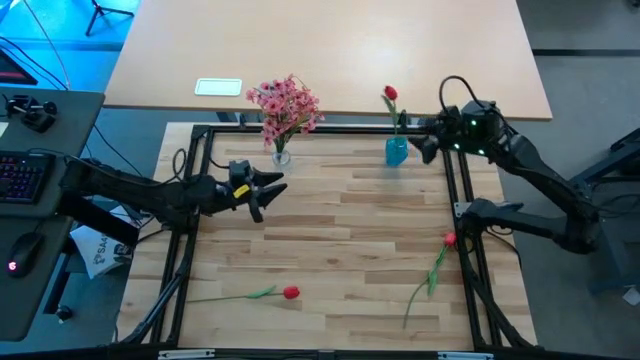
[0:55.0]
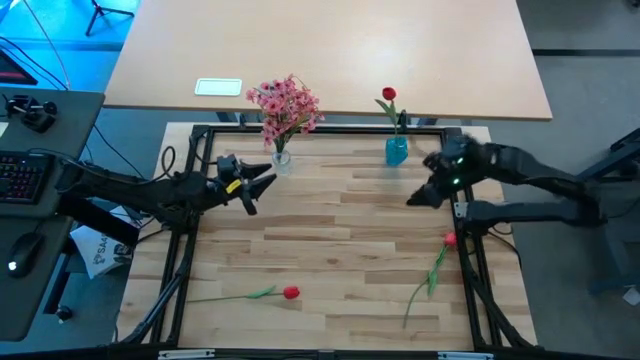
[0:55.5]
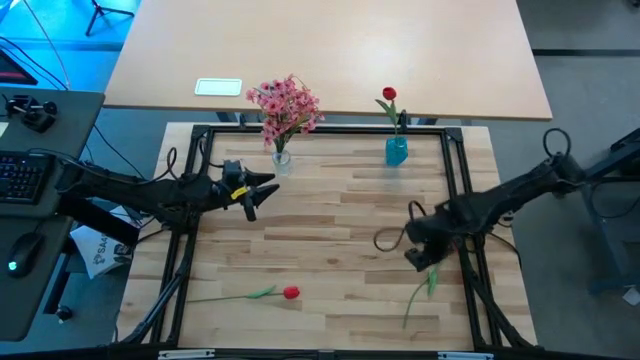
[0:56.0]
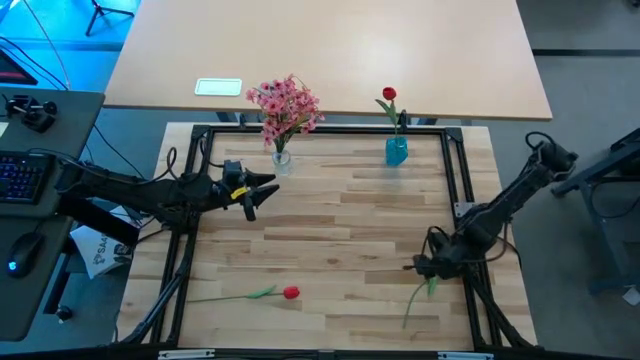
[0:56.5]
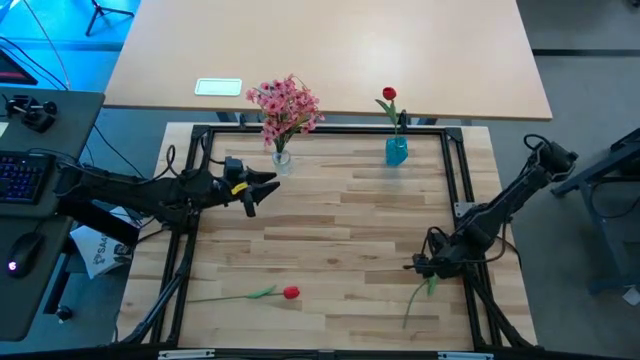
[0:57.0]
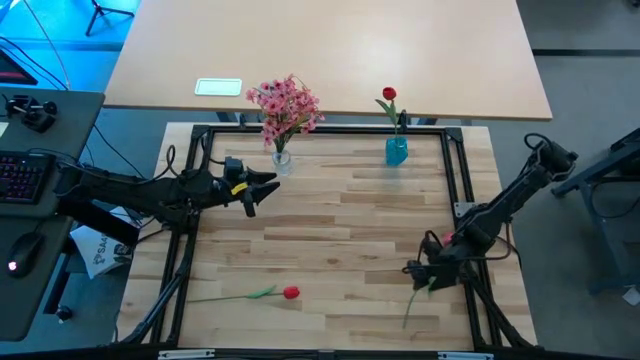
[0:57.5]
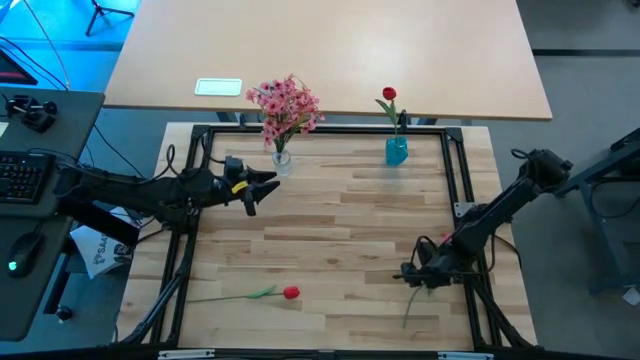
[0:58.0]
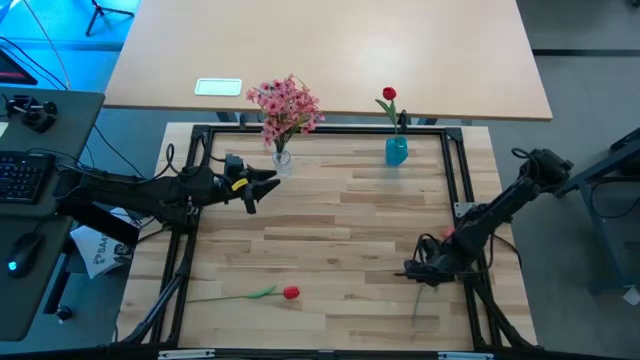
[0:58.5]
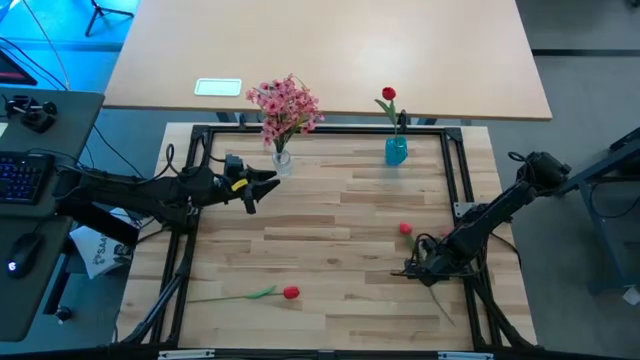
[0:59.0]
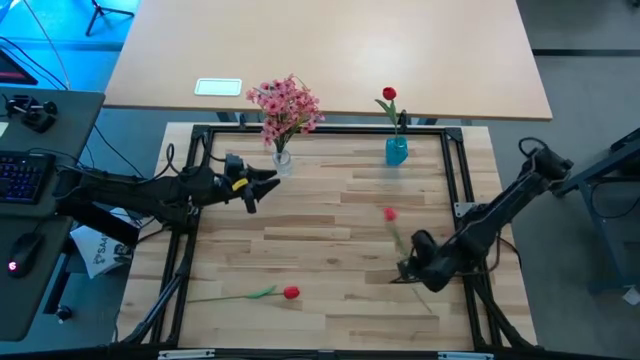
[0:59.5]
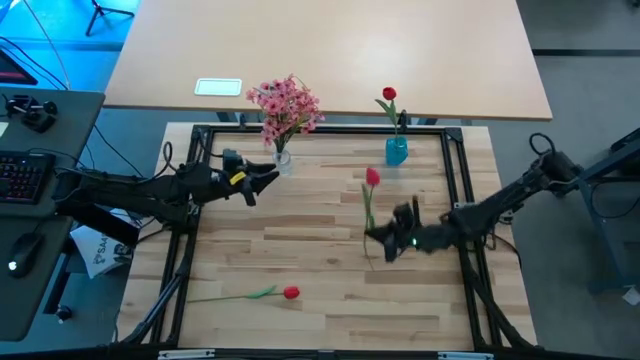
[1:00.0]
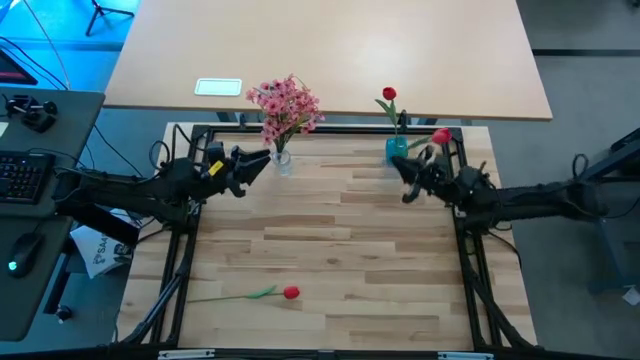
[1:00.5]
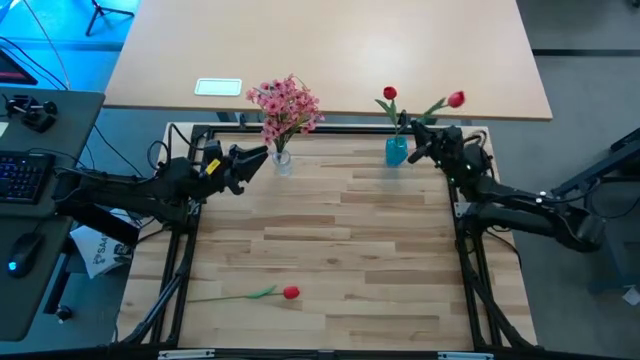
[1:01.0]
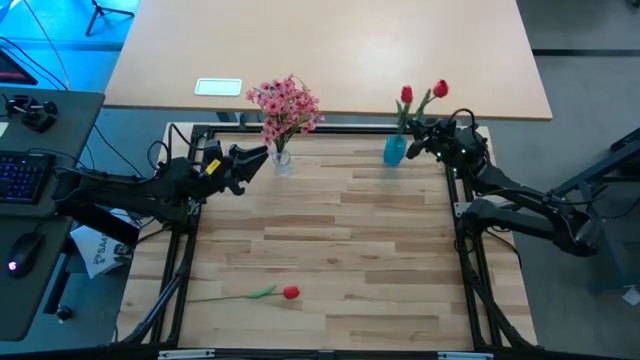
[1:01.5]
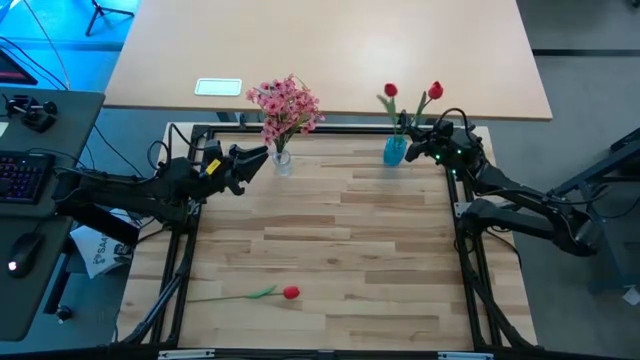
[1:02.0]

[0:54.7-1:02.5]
Task: Sort flowers into vase by color
Put the right red tulip into the blue vase

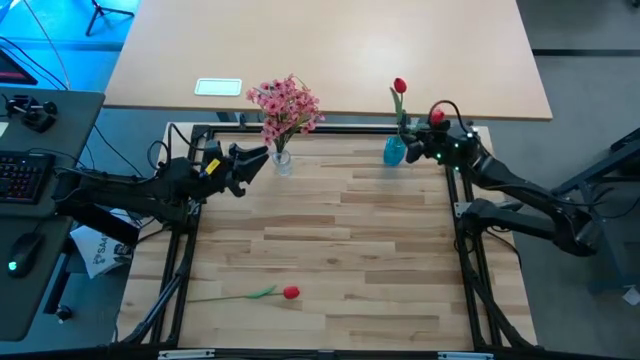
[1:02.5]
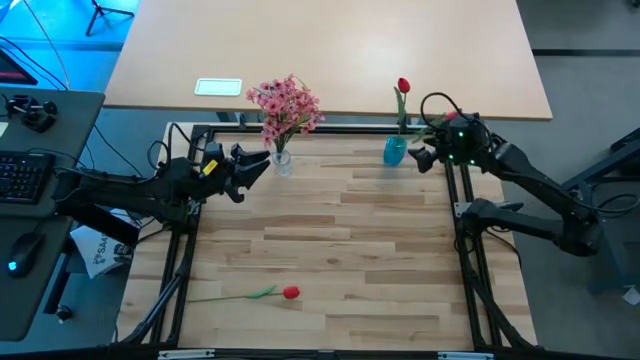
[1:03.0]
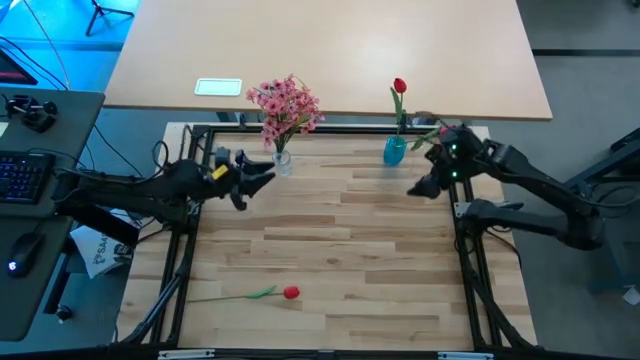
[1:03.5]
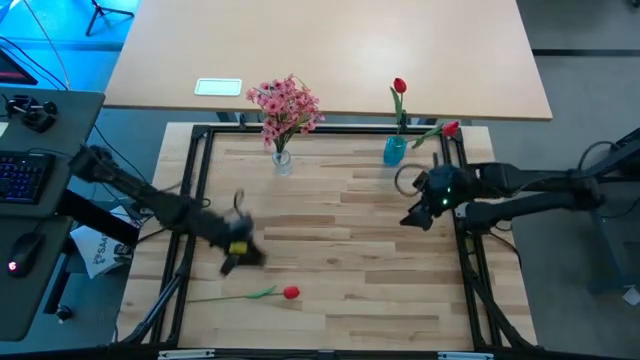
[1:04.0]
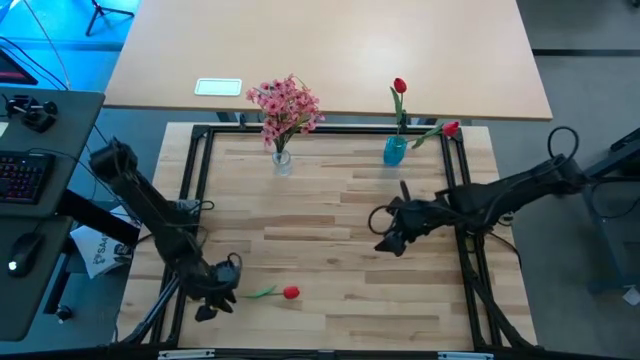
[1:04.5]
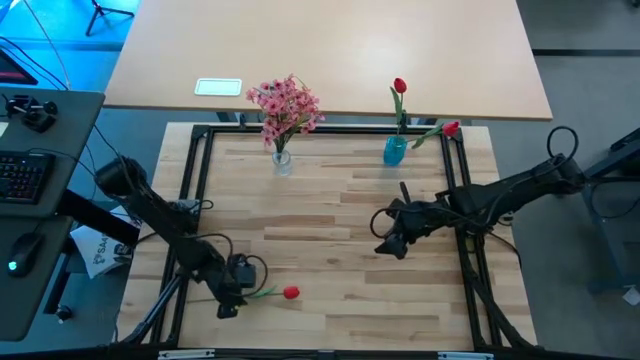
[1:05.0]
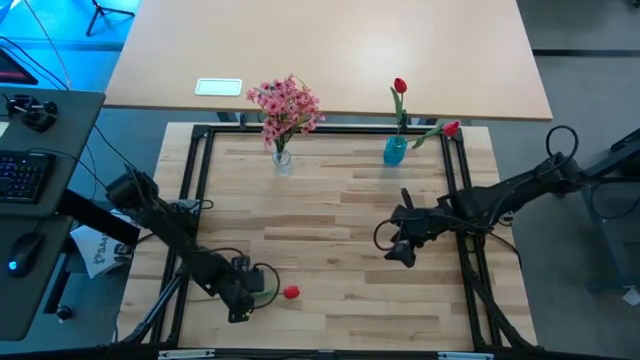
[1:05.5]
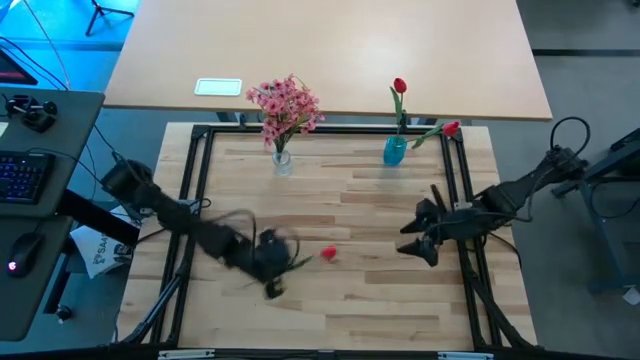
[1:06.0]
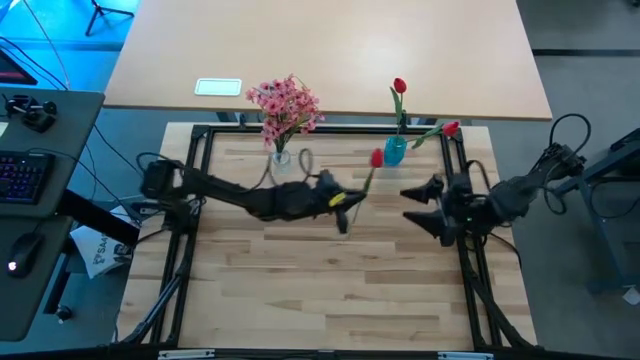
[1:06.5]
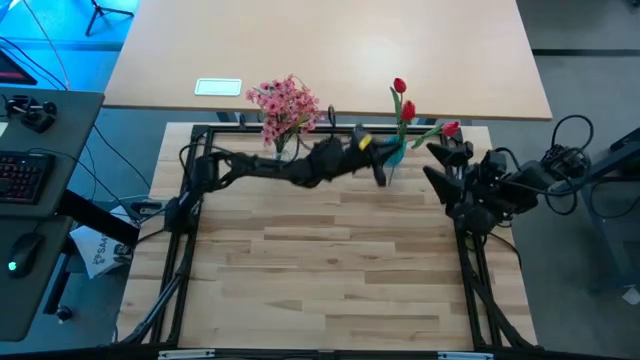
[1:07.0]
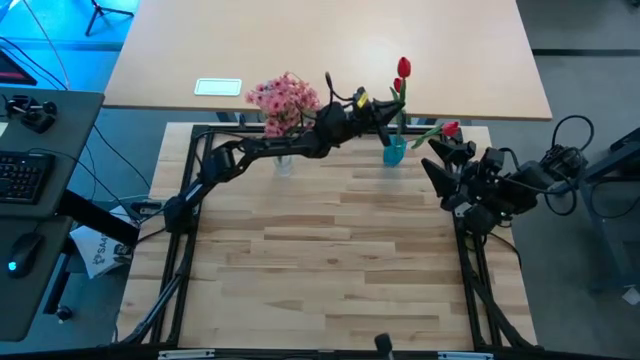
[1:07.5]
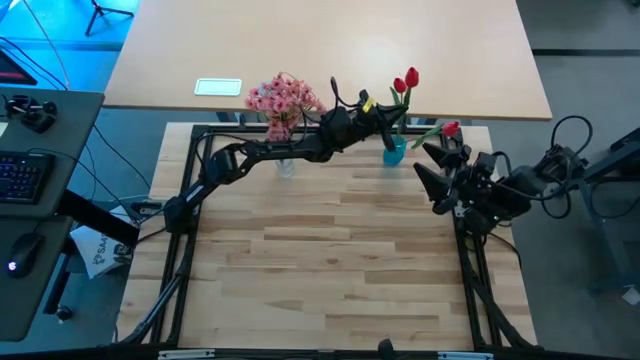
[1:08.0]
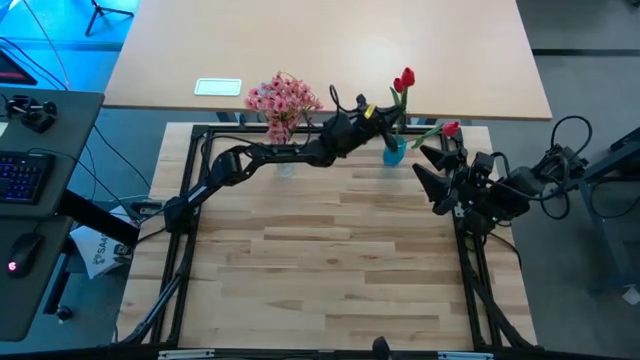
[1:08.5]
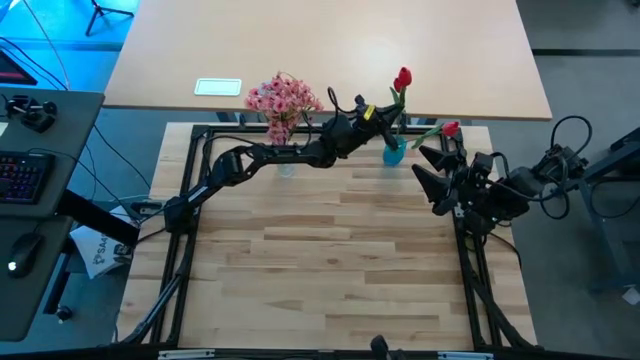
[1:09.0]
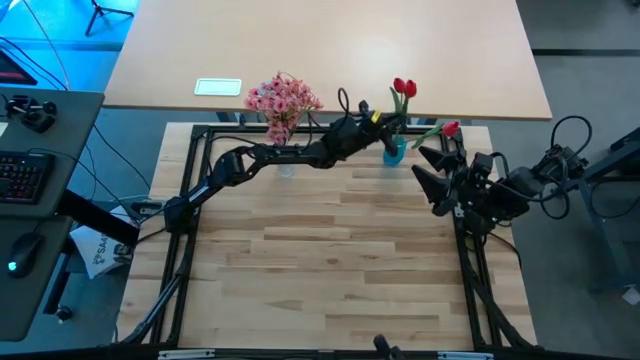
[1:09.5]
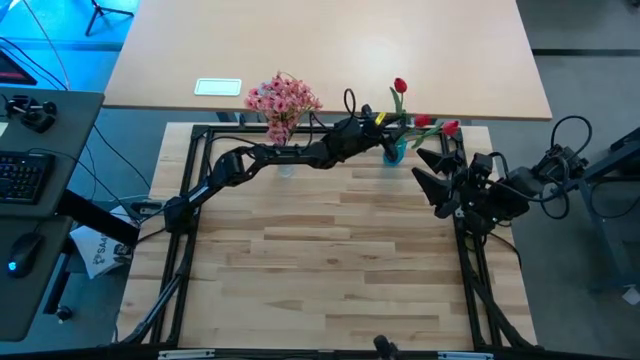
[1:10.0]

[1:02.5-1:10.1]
Put the red tulip into the blue vase

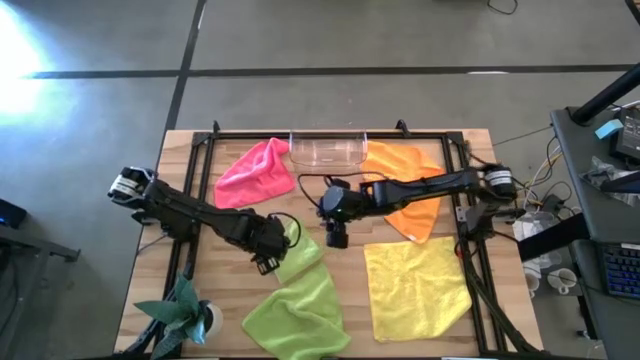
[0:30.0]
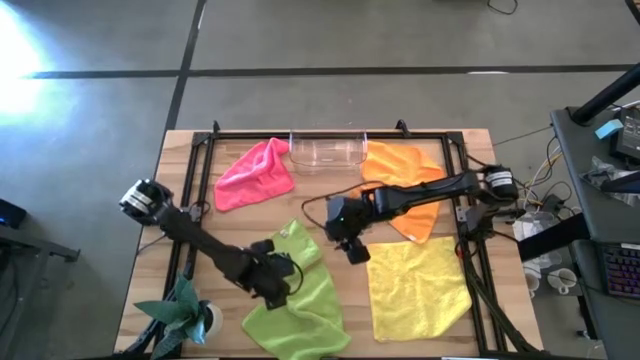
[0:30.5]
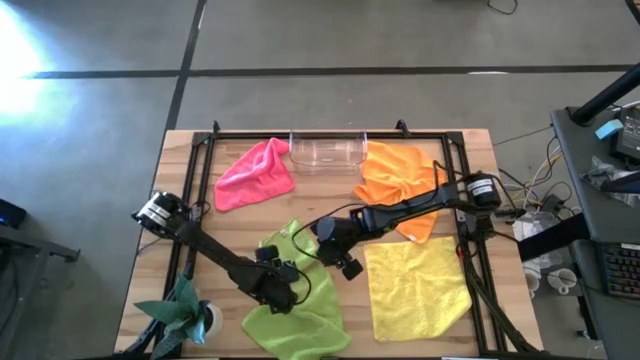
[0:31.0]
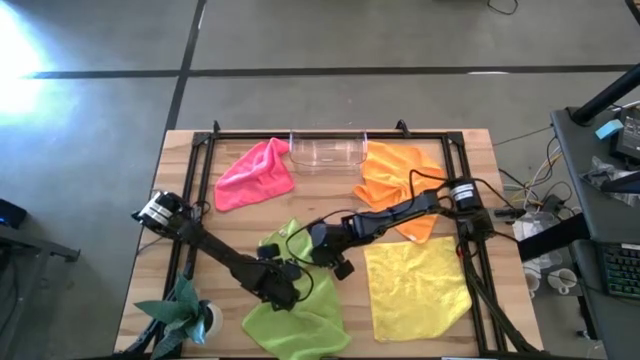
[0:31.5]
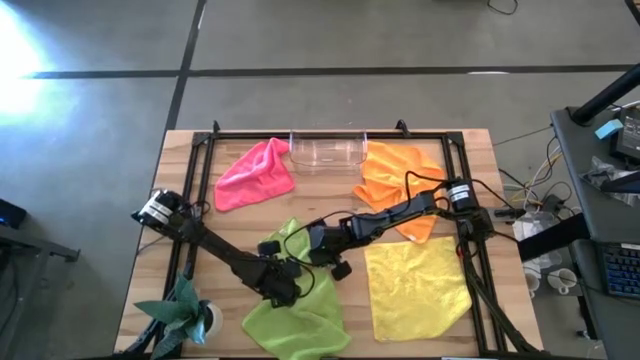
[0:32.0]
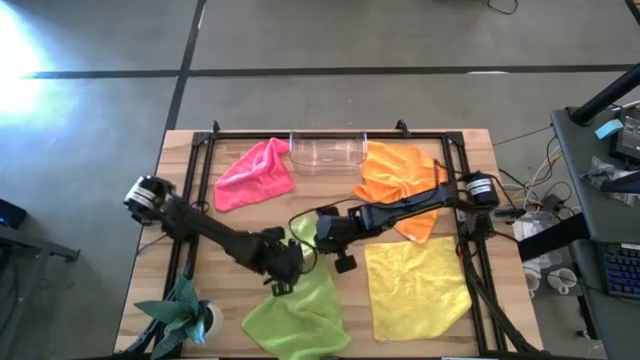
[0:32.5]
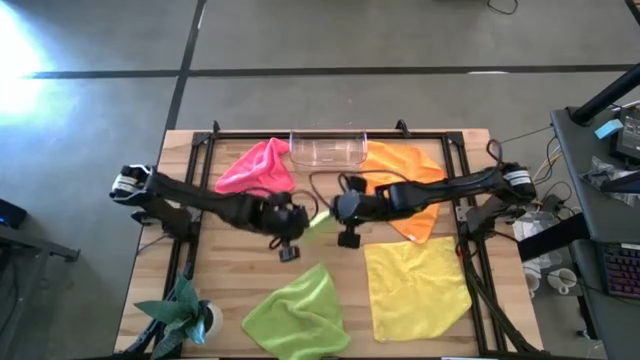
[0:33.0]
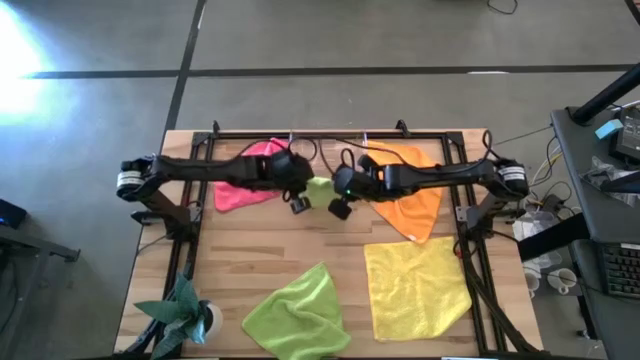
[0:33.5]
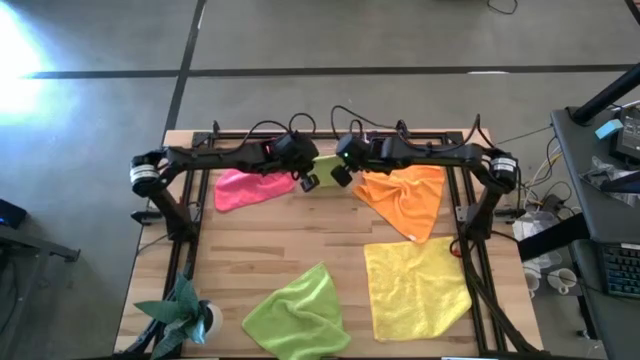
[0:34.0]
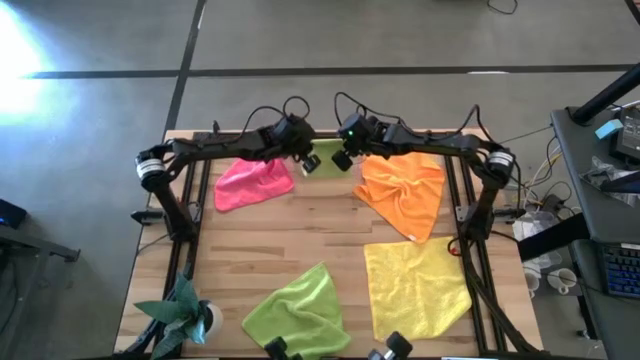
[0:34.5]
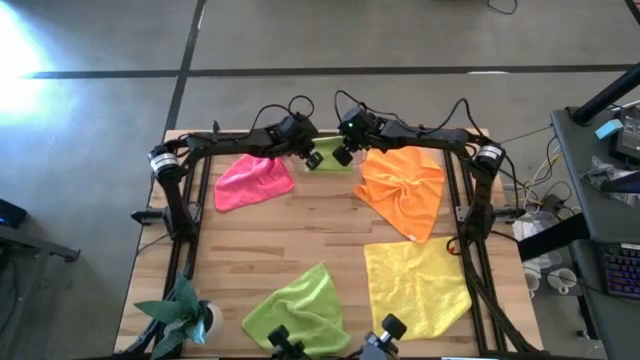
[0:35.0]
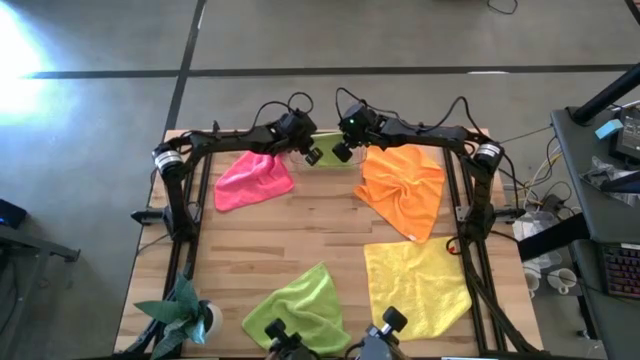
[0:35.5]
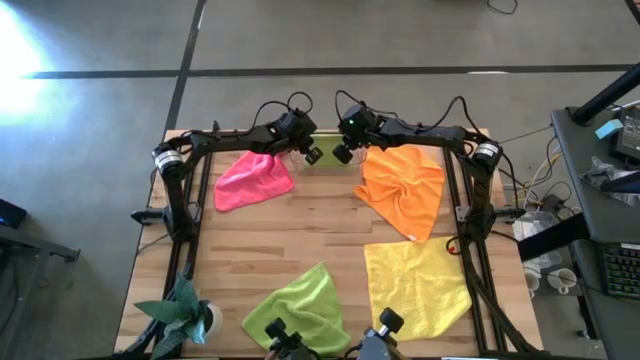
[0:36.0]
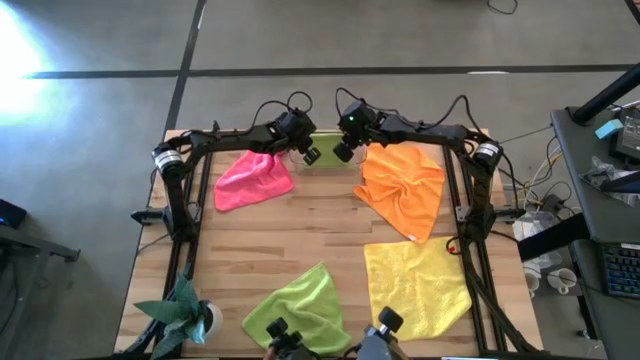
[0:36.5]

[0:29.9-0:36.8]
Task: Fold microfiber towels
Put the top green microfiber towel into the transparent bin
